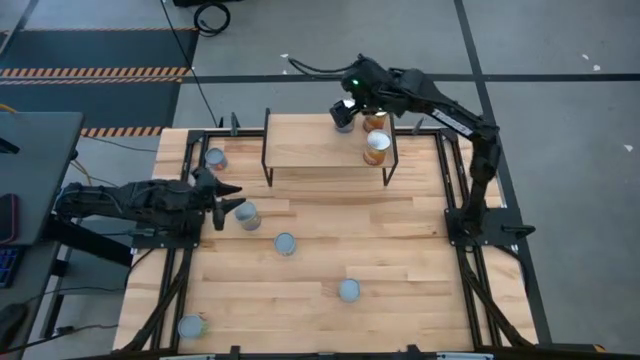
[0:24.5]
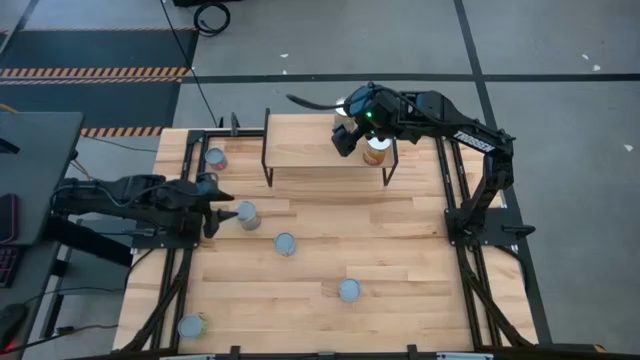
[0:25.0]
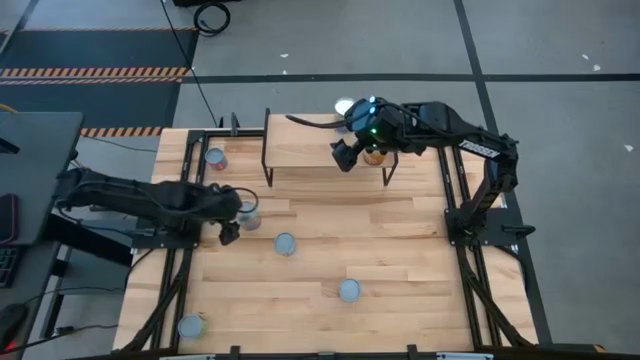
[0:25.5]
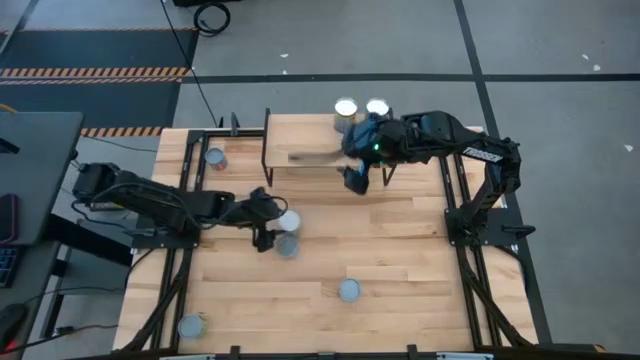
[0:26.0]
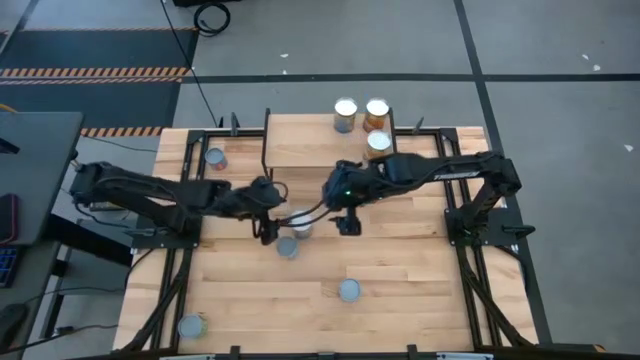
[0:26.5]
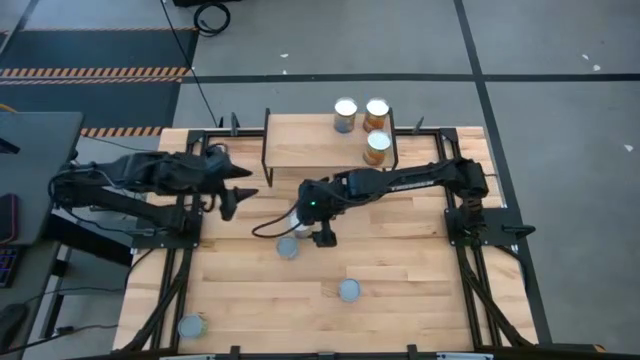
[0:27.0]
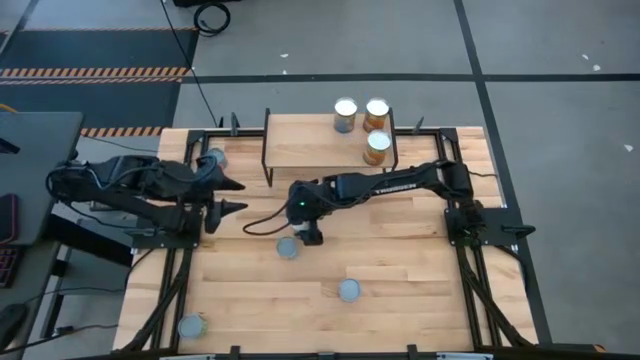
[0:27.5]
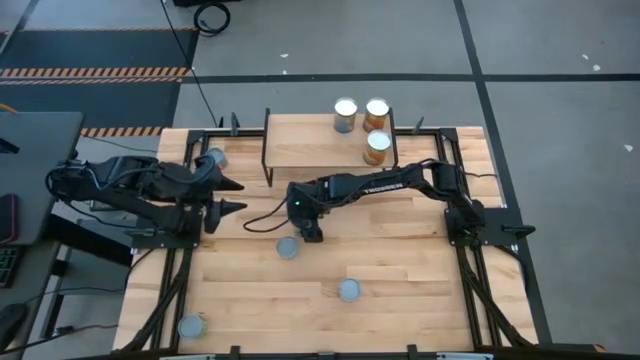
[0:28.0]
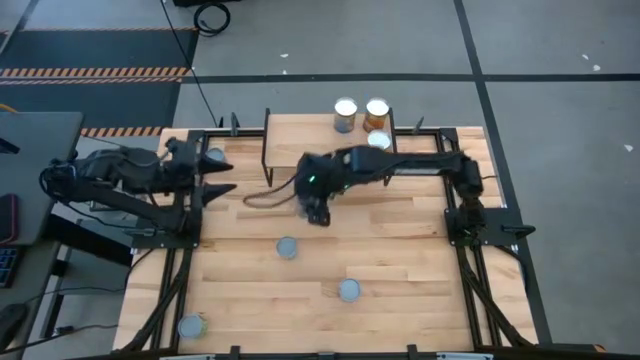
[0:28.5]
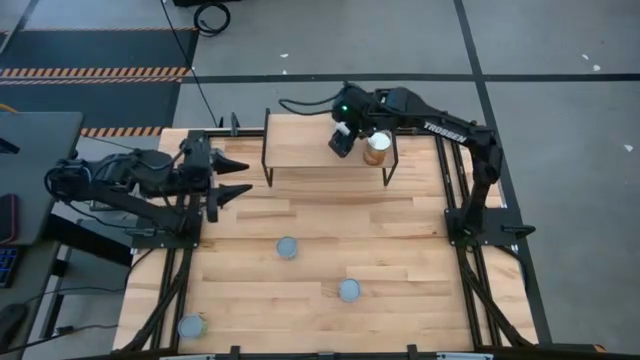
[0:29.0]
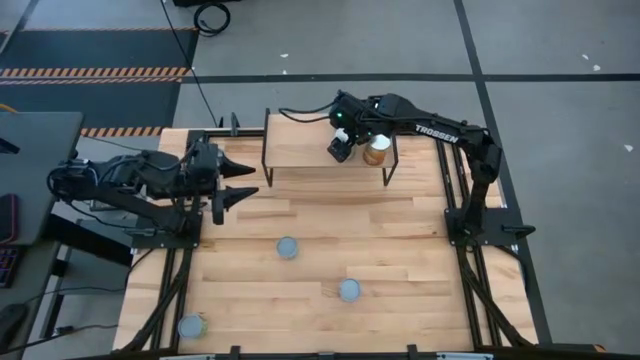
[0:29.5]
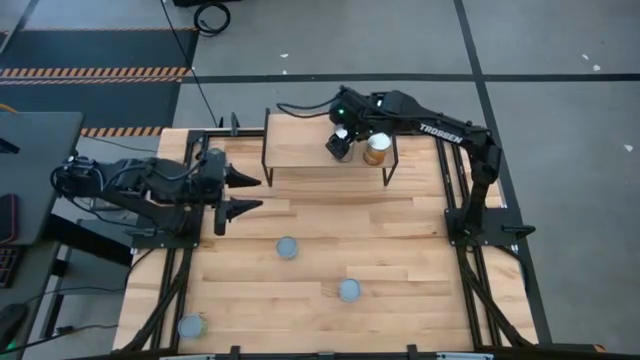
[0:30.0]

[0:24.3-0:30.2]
Task: Pick and place cans onto a shelf
Put the canned peaches on the shelf aligned with the other canned peaches

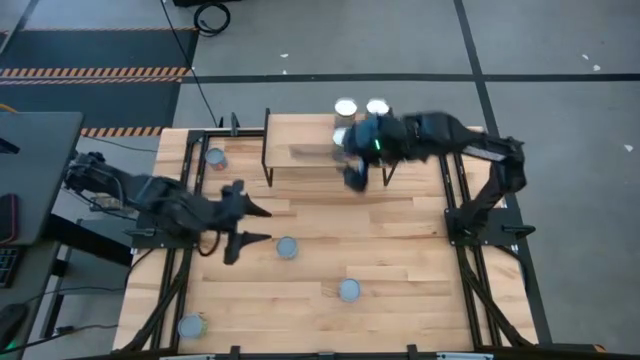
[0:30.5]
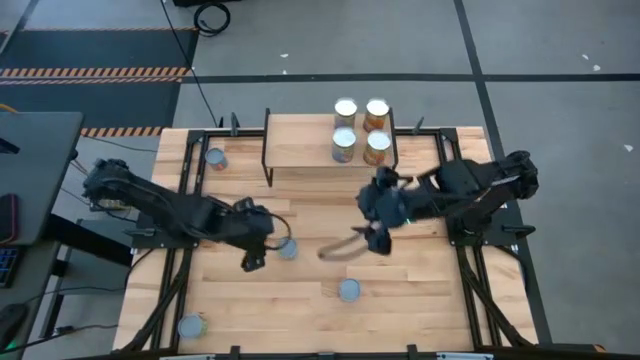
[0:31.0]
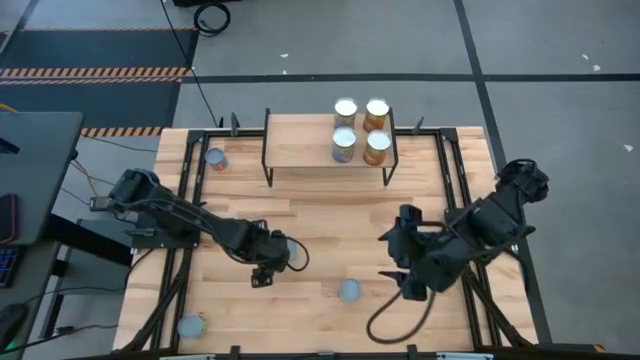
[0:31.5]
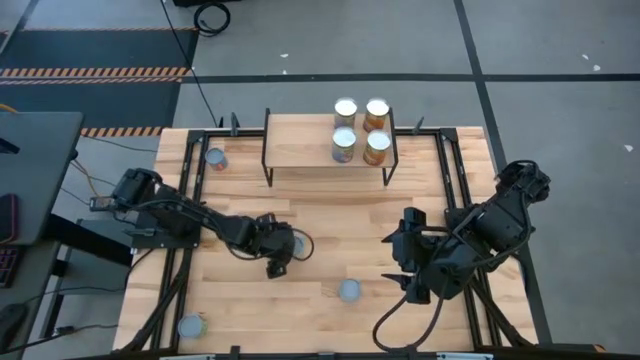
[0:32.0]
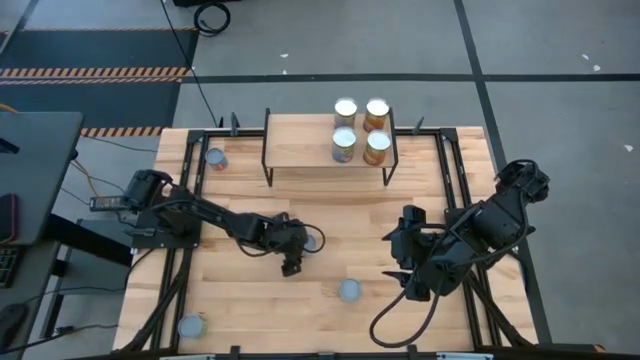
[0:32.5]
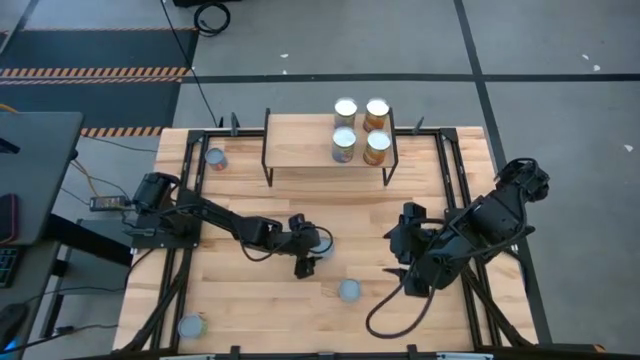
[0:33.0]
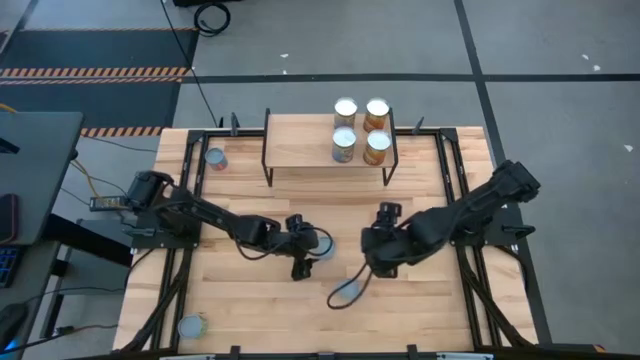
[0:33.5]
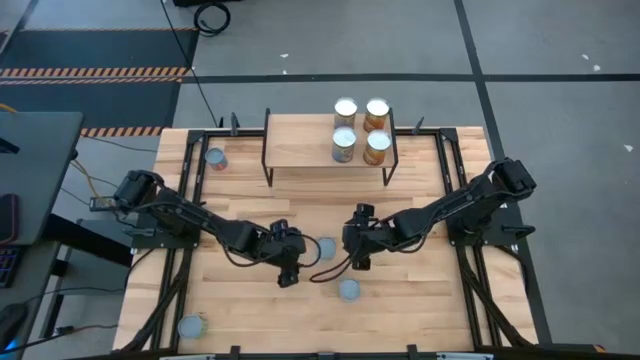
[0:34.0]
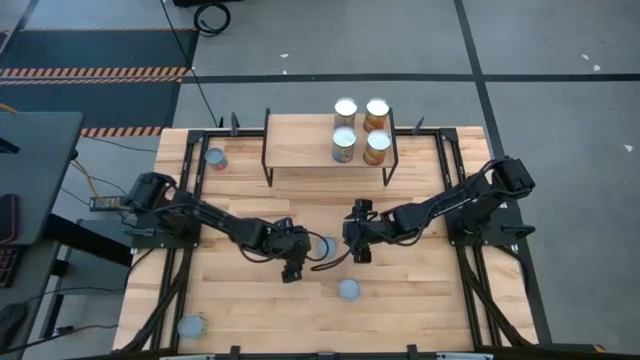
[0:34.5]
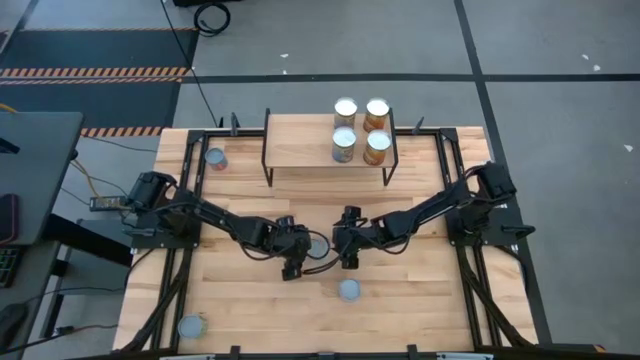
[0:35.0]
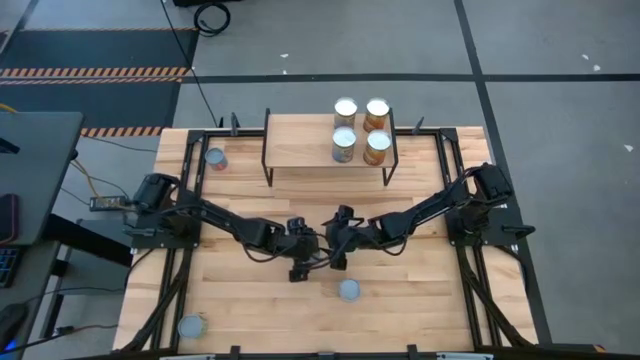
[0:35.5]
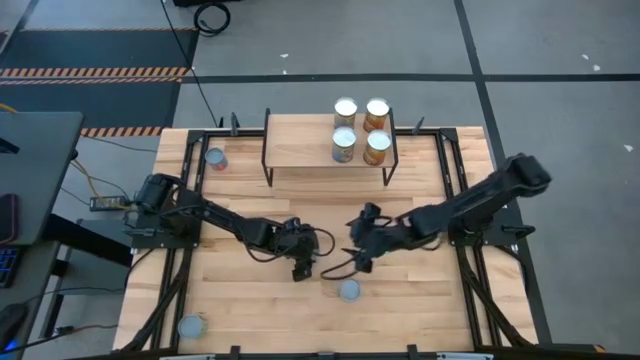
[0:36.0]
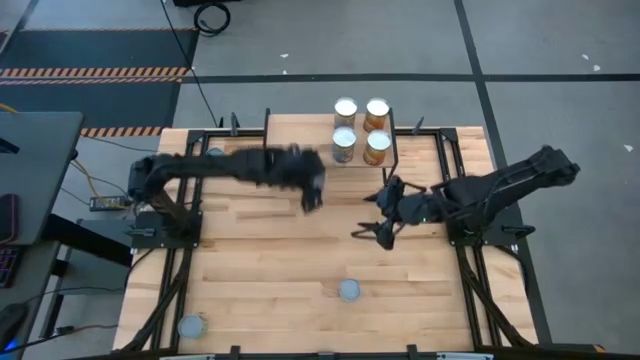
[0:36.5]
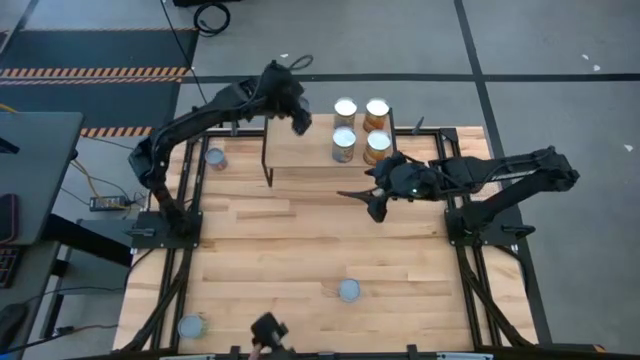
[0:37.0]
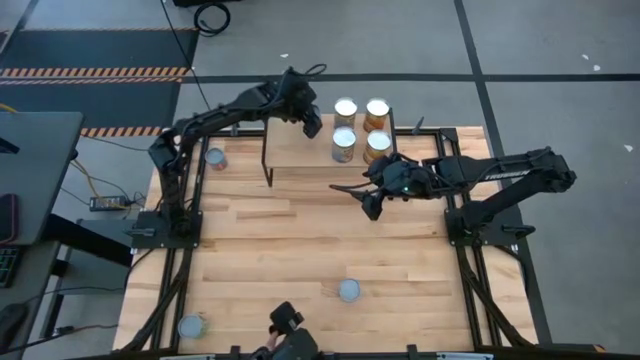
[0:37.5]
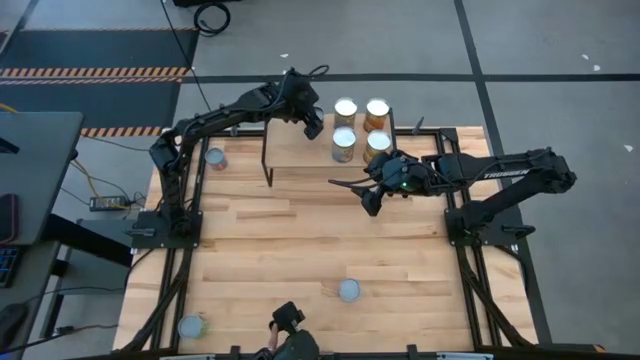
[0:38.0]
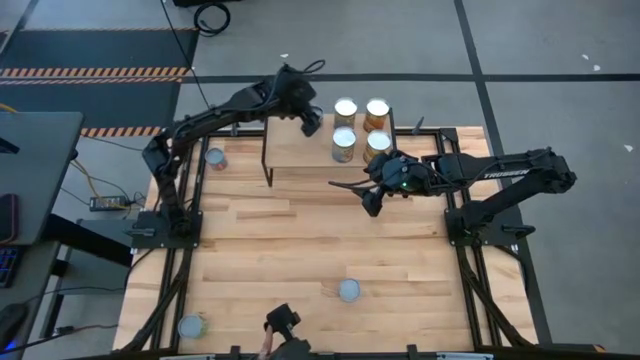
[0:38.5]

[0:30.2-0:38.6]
Put the canned sliced carrot on the shelf

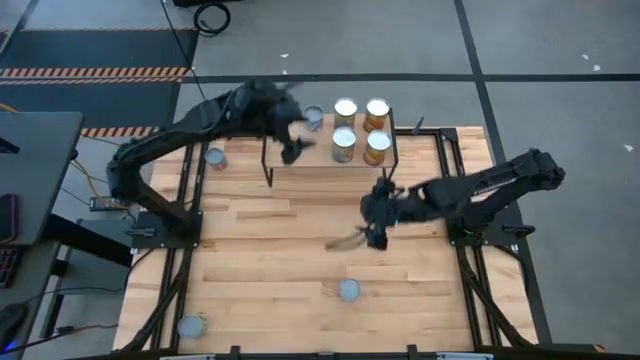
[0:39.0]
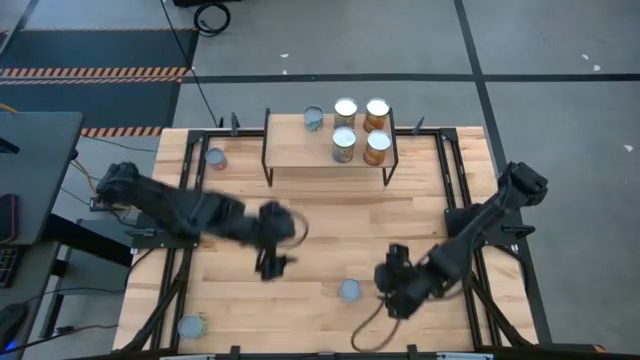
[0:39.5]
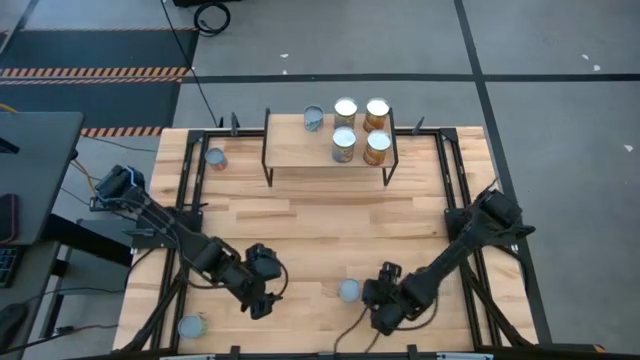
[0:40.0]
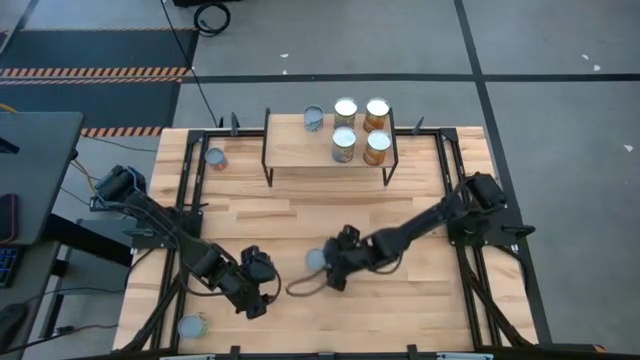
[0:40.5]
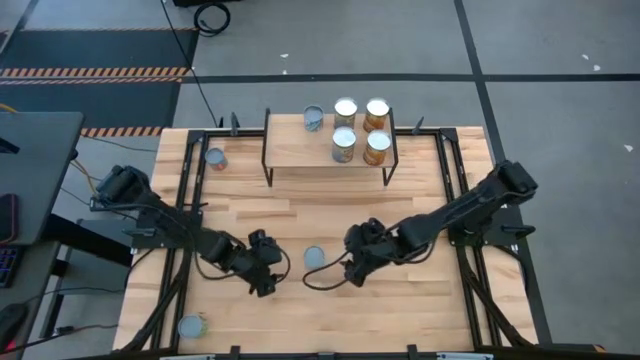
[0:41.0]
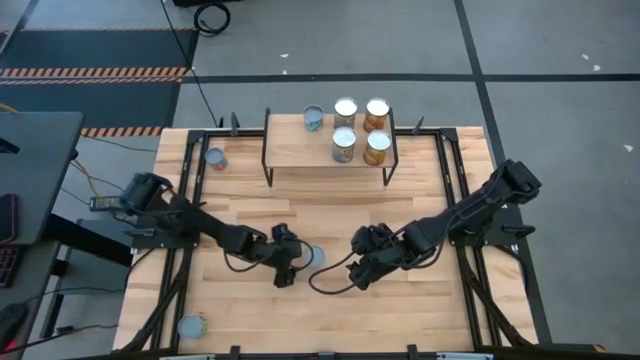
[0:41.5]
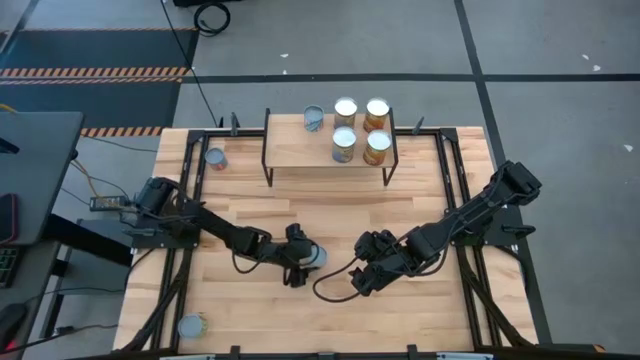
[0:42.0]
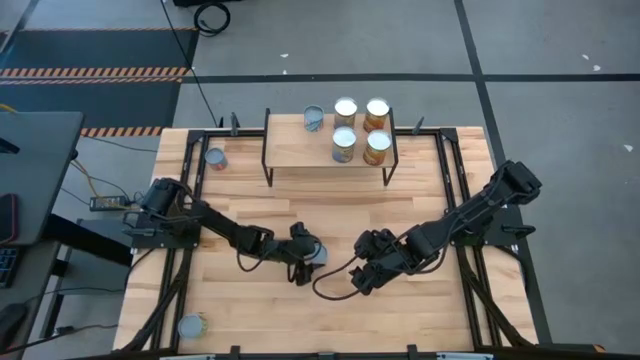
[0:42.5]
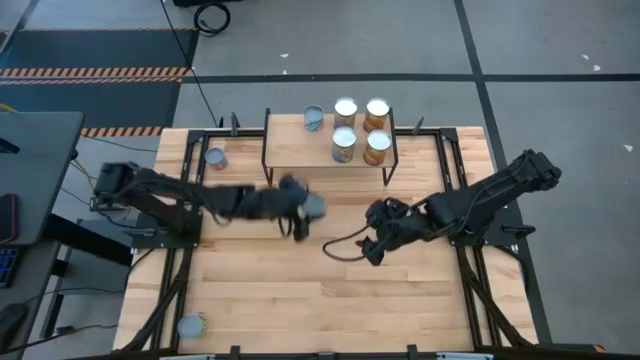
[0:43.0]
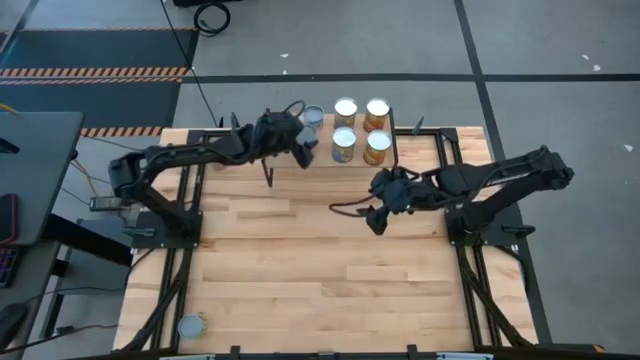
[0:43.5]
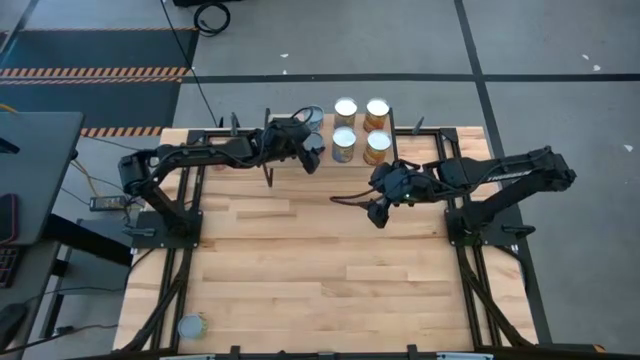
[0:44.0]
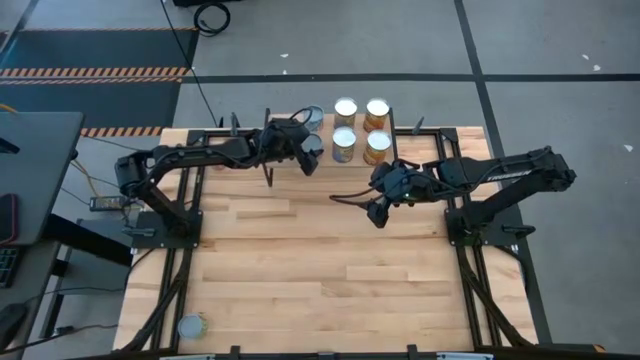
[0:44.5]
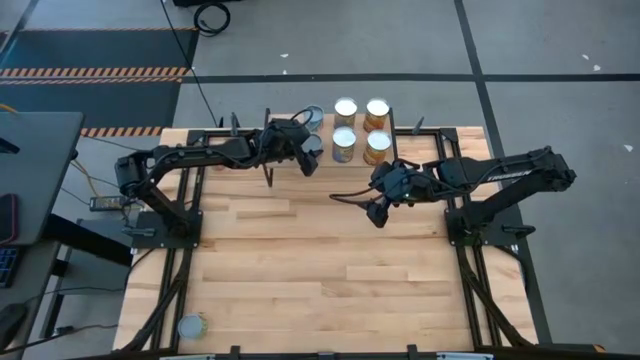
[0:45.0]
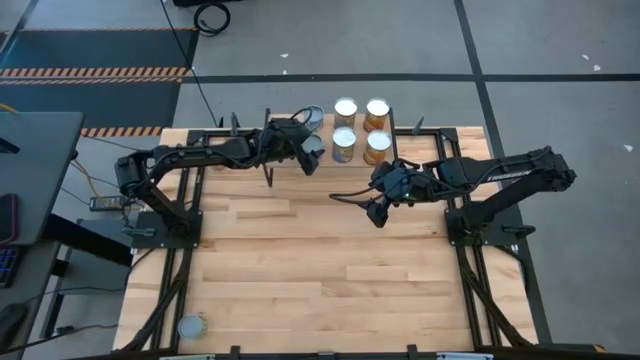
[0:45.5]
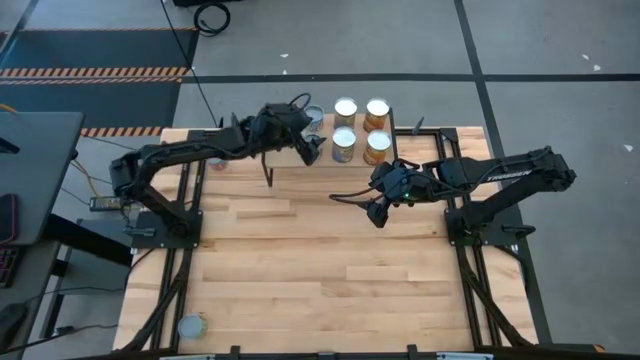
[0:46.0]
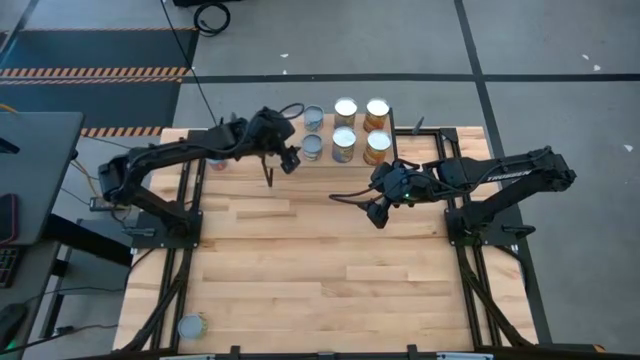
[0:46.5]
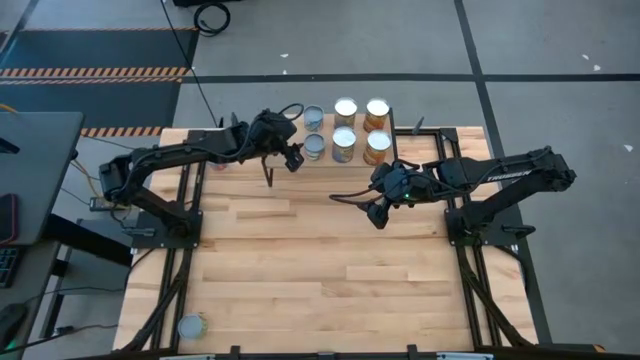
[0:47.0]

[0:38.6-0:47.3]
Put the canned oranges on the shelf
